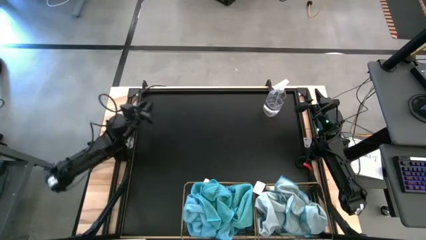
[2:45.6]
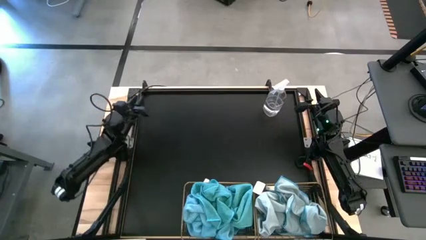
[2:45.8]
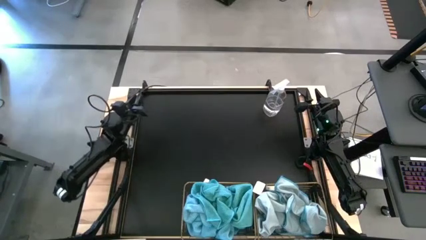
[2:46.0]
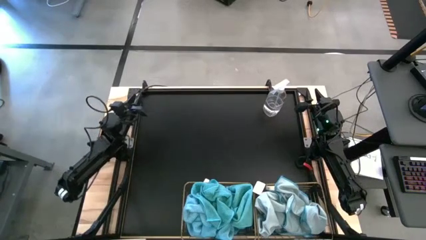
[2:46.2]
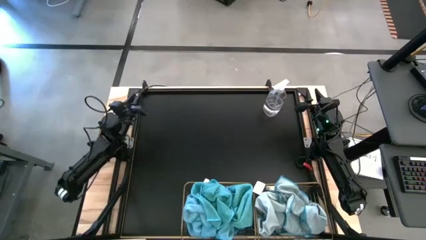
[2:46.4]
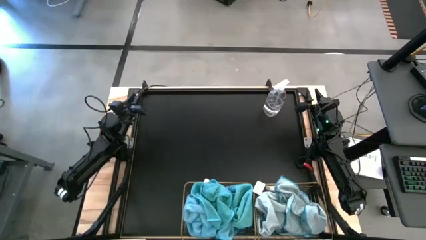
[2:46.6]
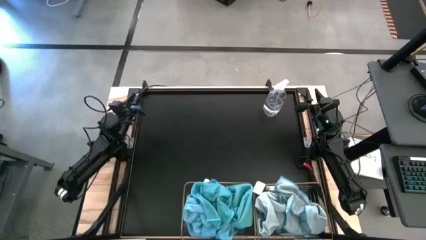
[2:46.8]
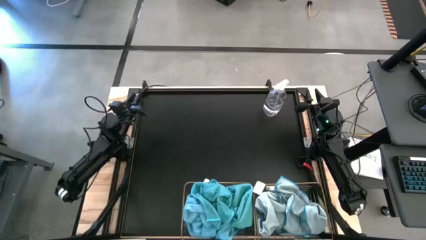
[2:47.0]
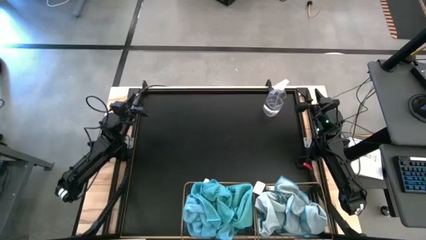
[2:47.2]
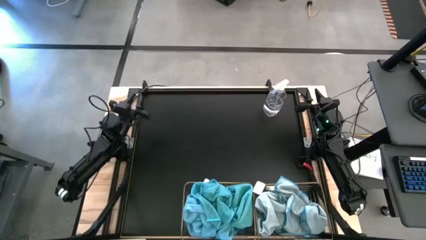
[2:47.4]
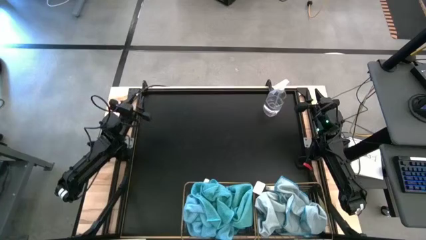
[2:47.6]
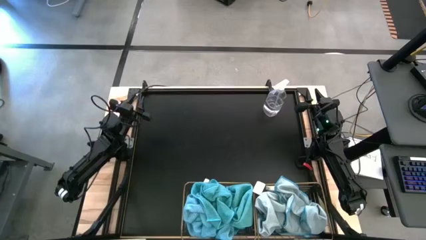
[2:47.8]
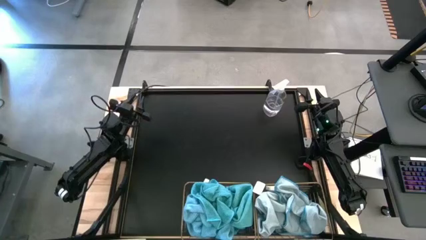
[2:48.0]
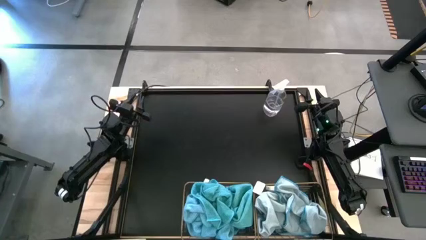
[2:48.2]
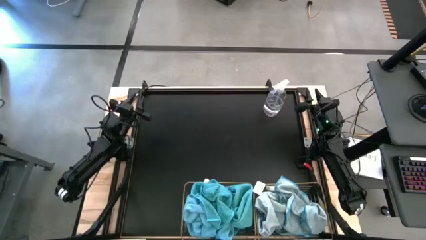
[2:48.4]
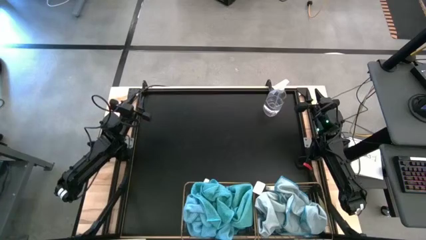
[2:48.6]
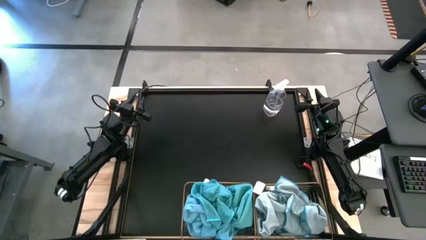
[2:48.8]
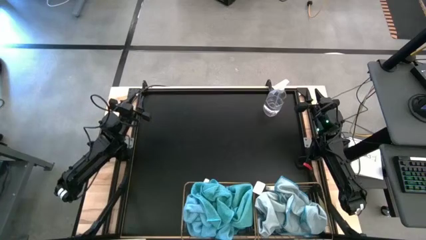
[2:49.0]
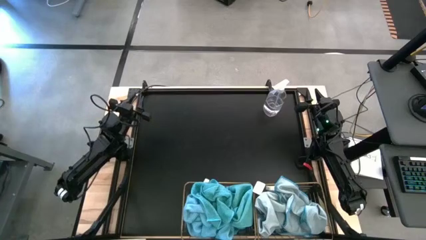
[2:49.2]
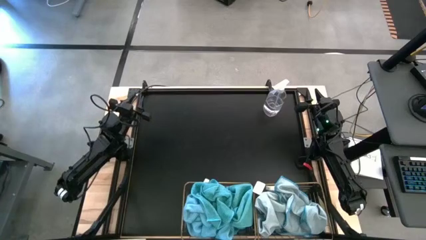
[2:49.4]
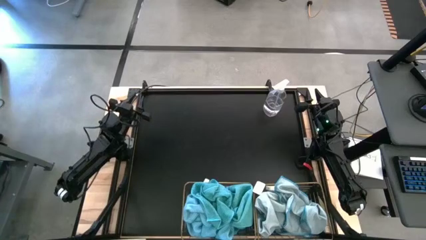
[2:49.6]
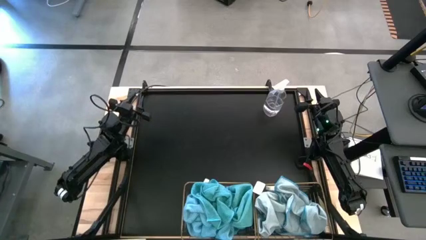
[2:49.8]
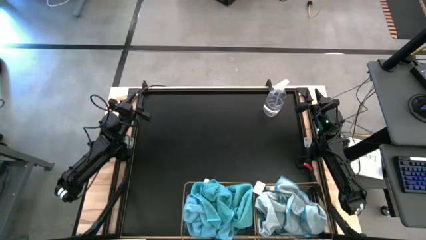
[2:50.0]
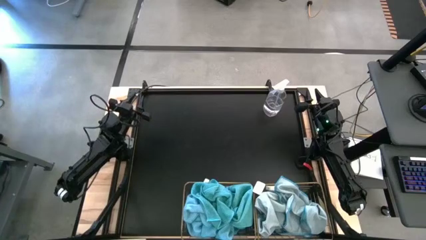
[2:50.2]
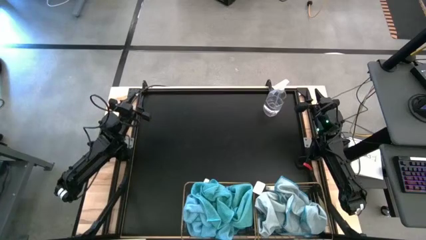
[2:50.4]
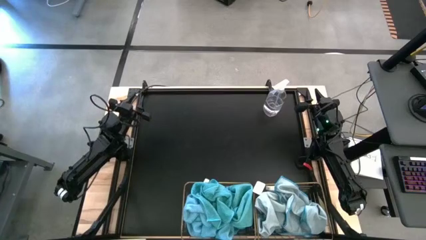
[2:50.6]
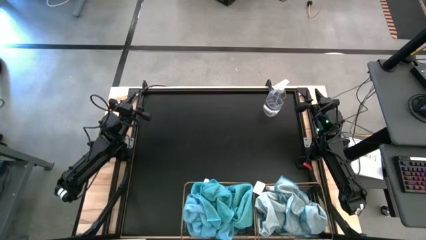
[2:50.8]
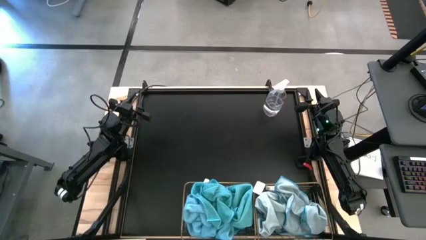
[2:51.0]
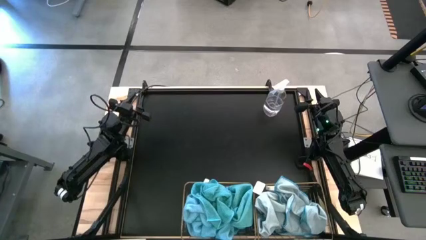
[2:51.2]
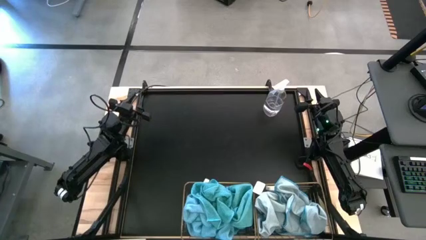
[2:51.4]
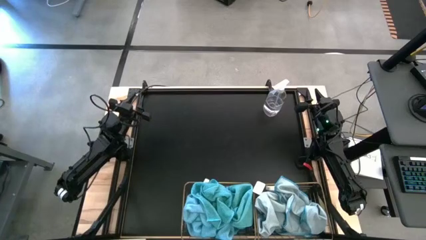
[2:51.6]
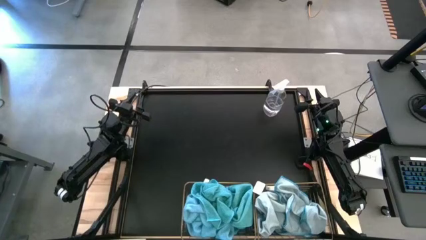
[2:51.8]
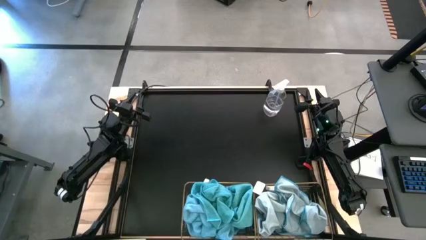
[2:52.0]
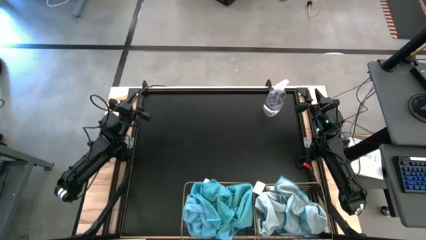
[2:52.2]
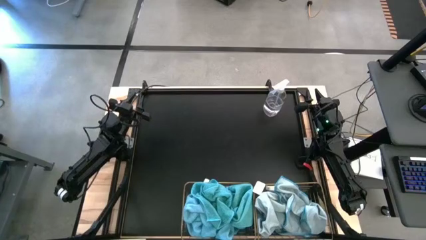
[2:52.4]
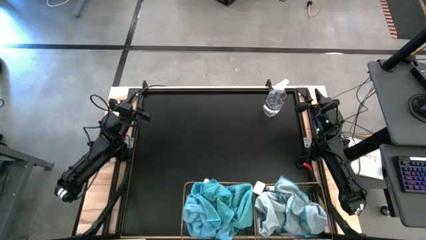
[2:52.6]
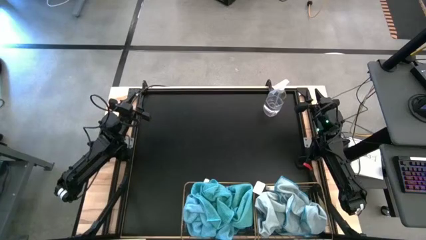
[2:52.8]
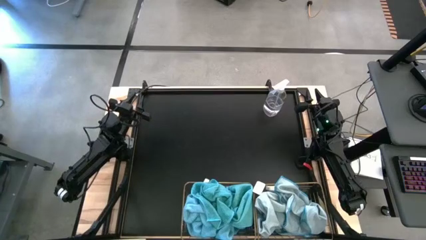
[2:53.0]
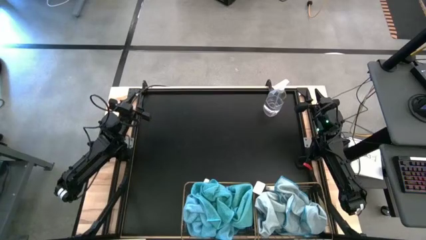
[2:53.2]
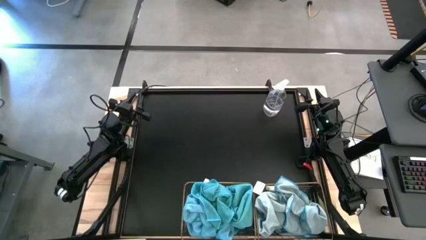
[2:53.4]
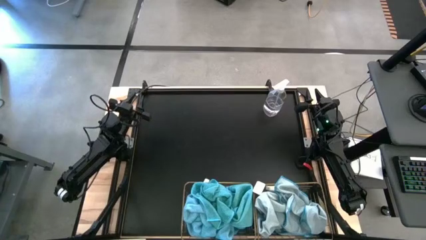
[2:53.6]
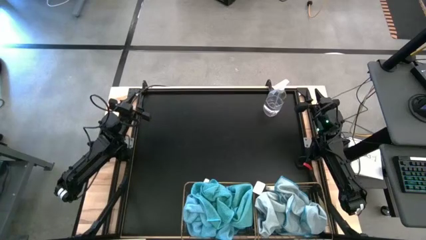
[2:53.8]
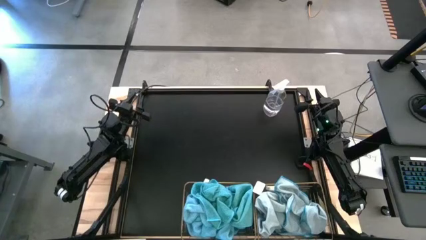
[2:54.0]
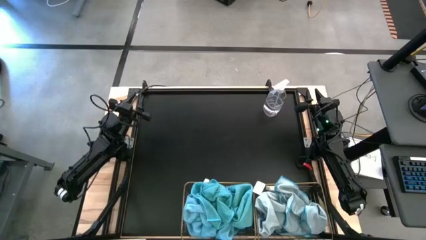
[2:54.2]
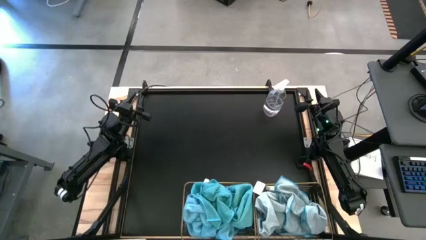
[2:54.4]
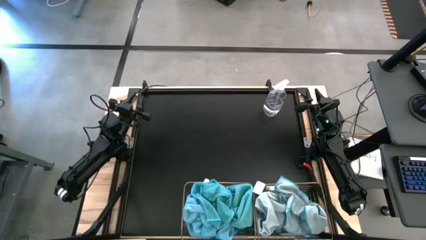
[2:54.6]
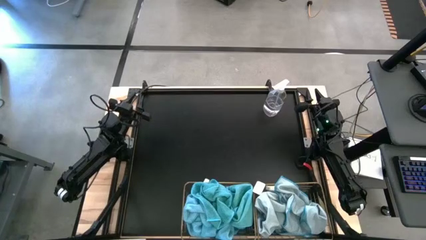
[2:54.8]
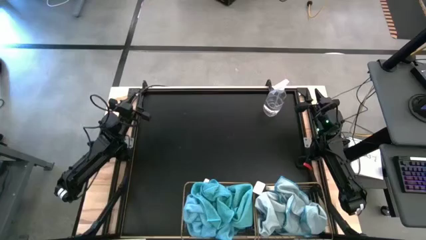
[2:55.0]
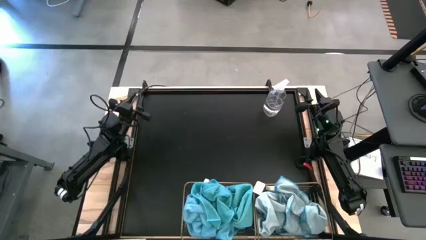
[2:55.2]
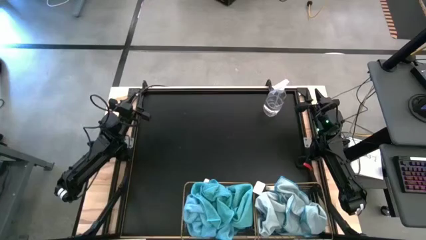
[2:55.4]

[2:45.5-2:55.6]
Task: Sort microfiber towel by color & place in baskets
Return to Home Position

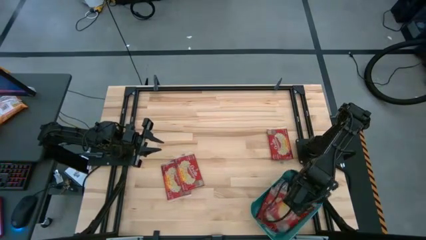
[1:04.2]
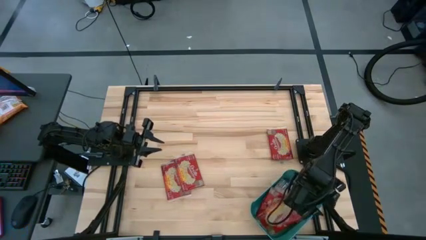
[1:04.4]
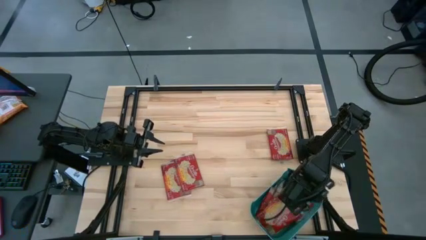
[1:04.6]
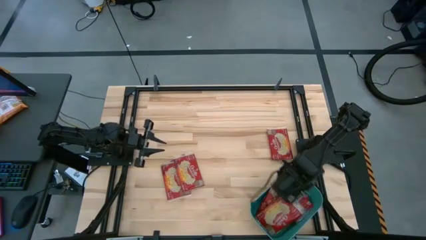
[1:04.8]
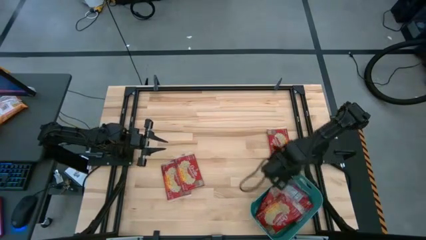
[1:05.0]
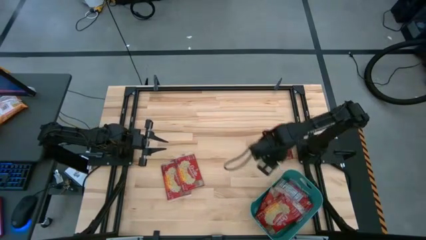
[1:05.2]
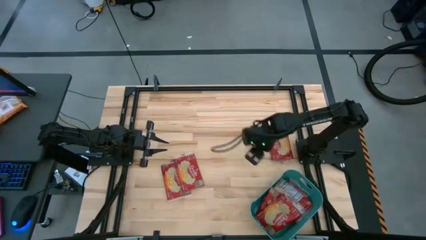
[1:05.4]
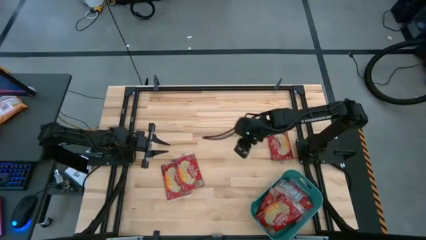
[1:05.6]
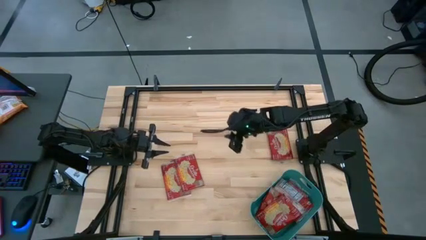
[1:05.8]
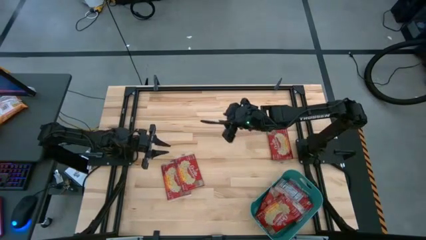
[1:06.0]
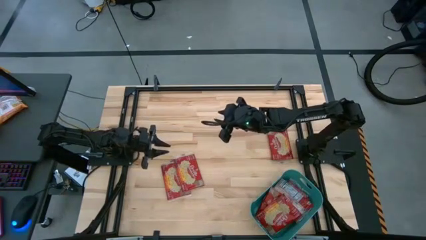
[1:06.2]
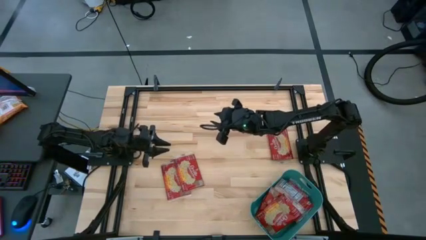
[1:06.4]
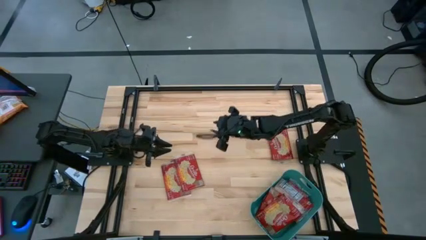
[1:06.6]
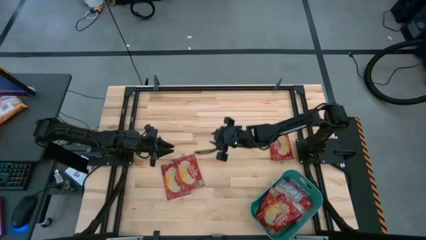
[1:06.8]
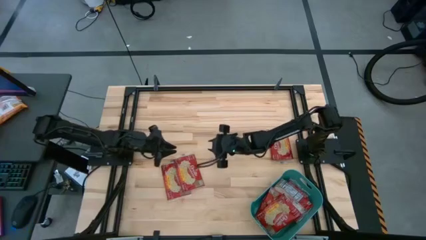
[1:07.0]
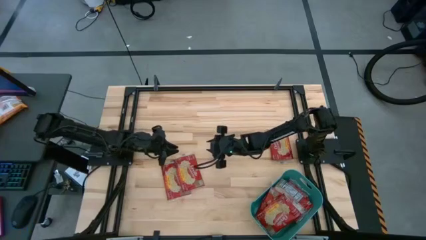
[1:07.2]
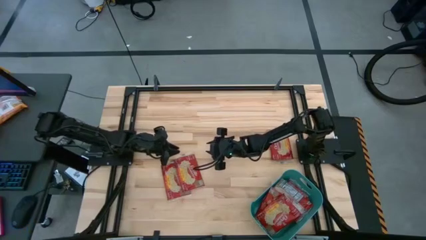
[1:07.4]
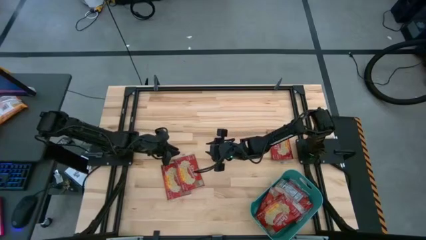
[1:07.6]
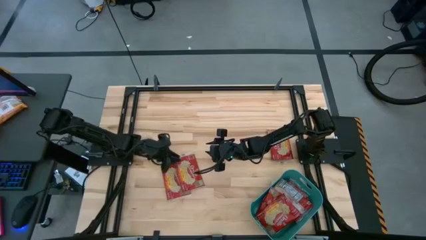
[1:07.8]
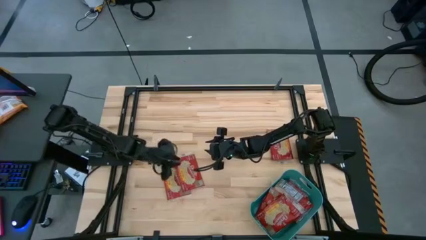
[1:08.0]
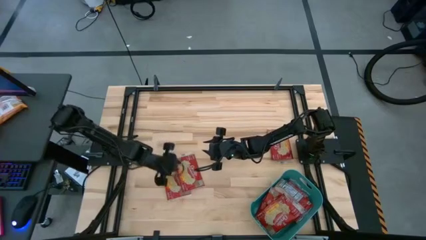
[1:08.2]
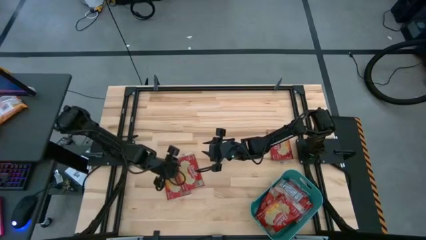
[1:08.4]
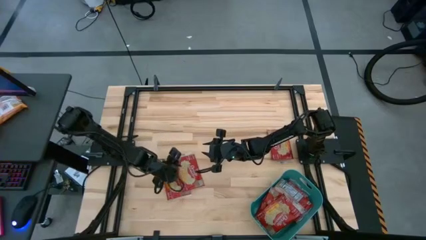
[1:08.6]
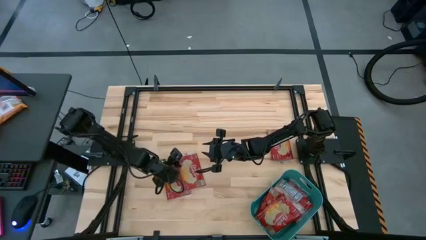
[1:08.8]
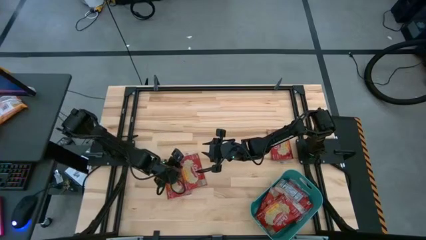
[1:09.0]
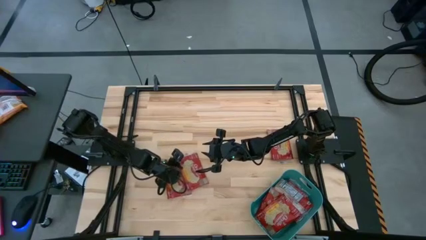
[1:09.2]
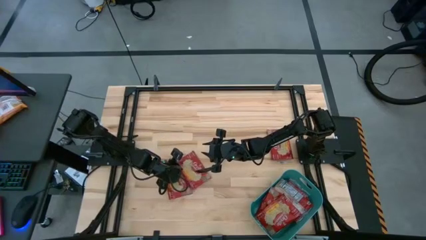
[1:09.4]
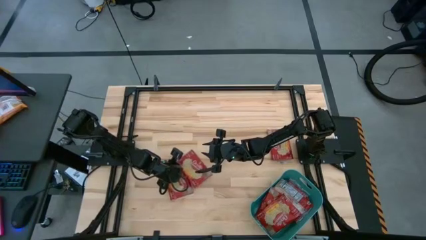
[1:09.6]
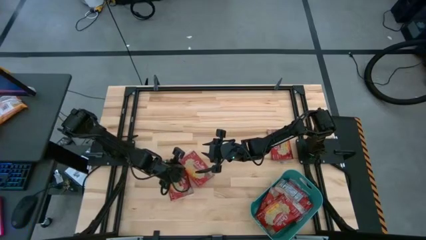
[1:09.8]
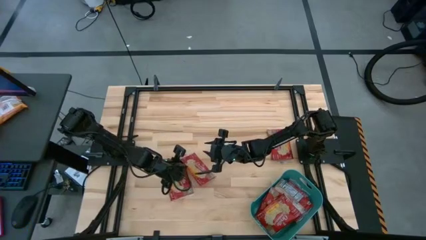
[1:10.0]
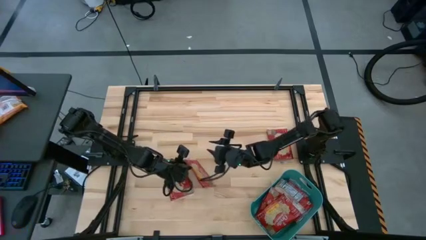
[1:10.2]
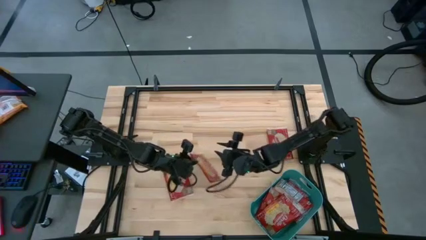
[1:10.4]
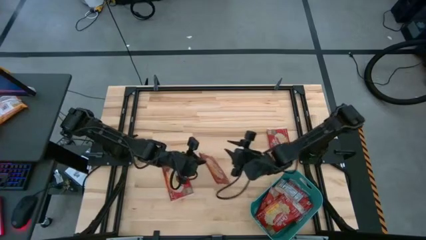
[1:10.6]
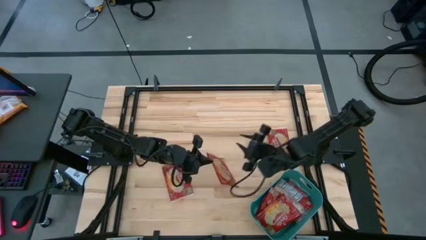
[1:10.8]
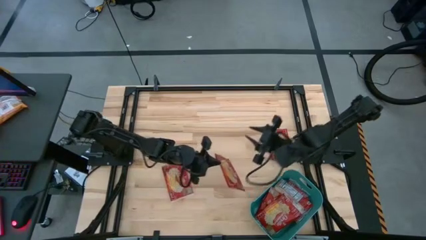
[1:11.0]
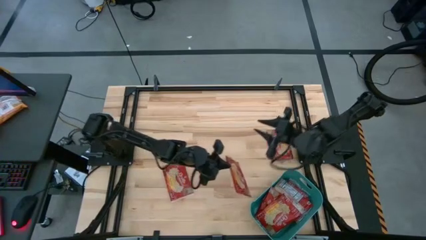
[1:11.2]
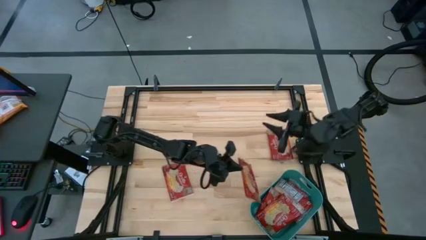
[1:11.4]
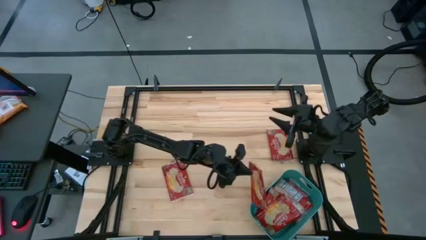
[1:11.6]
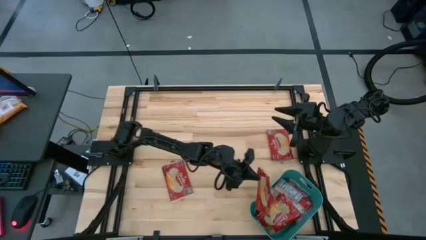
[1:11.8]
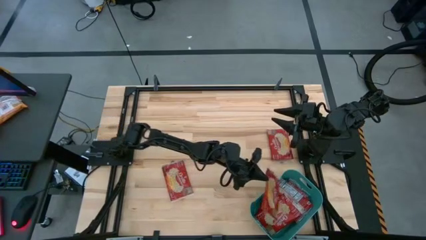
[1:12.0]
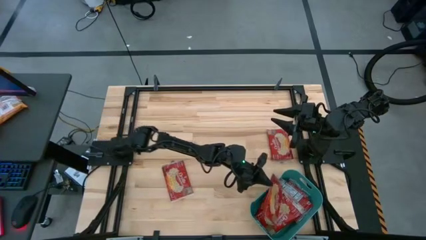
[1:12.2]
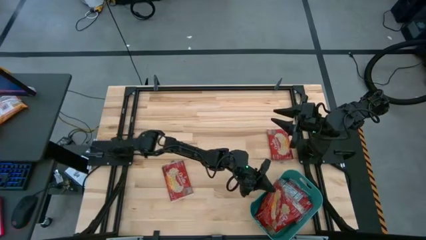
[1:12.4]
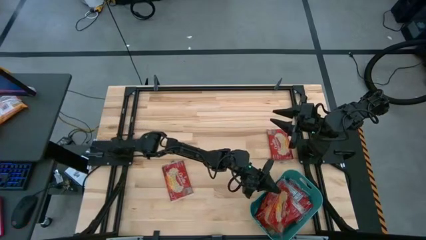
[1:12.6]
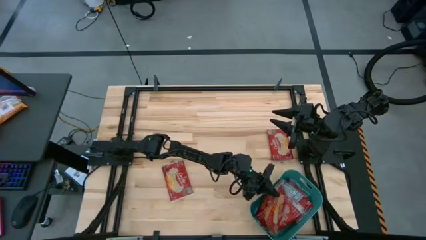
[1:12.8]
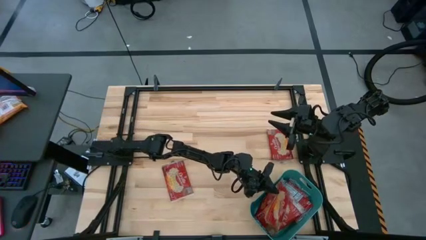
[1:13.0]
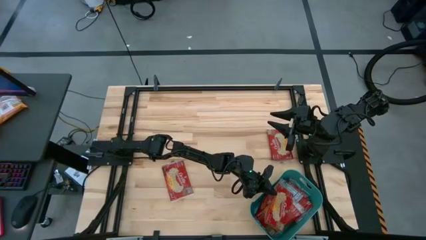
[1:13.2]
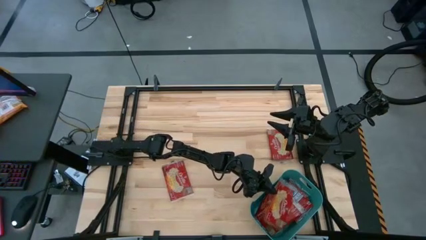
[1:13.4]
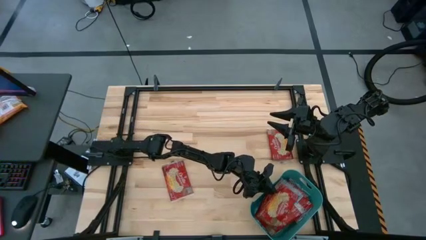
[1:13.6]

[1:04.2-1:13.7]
Task: Sort popcorn bags into baskets
Put the red popcorn into the green bin
